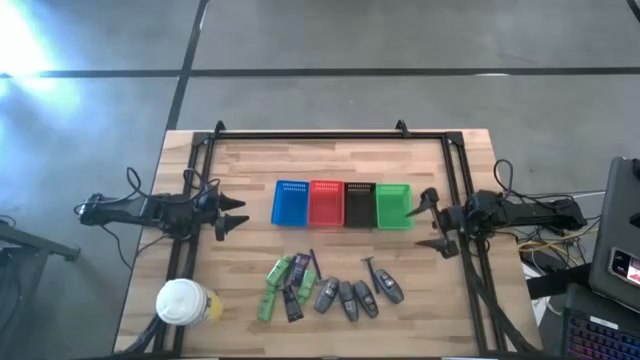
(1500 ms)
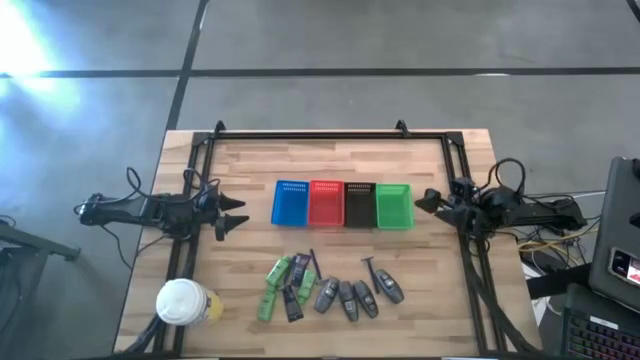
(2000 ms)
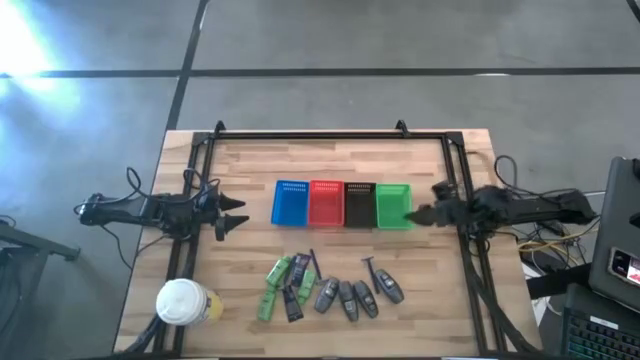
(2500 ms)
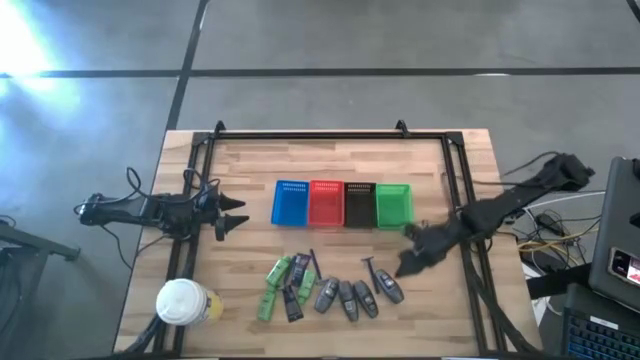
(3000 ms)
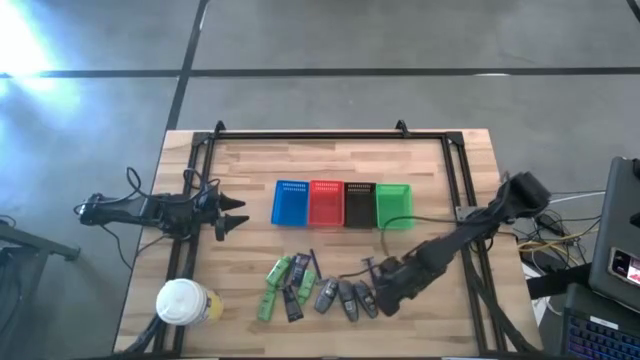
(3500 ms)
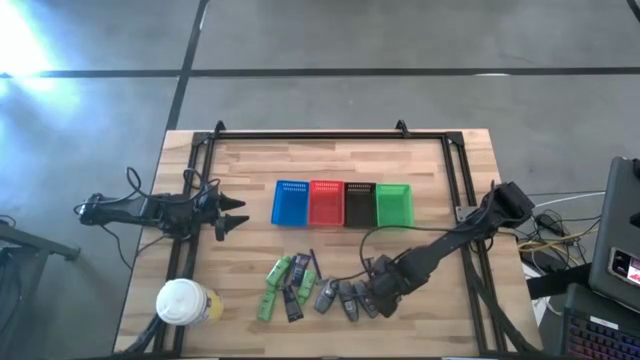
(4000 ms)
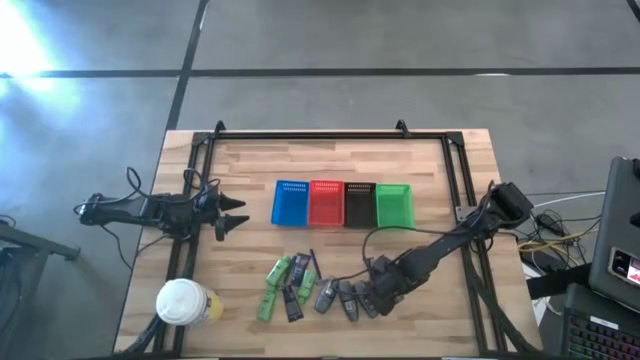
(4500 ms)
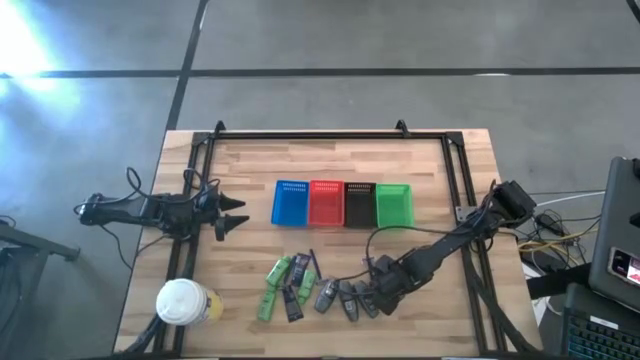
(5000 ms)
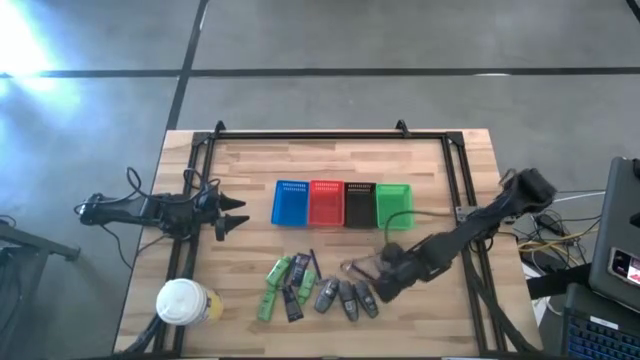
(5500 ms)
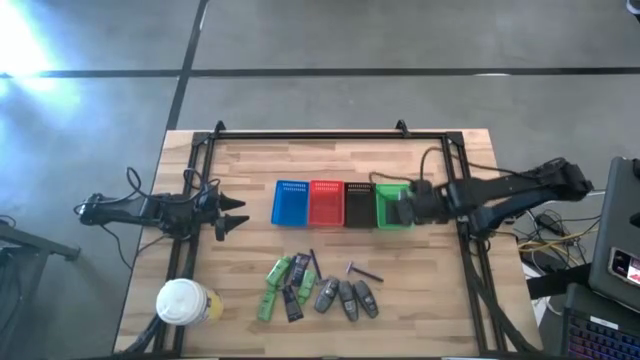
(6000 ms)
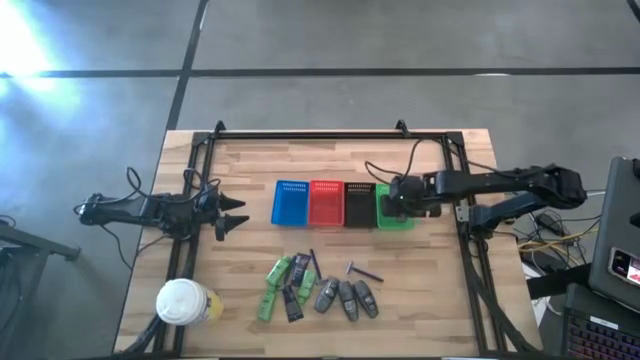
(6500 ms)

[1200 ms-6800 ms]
Task: Pick & Place Travel size toiletries
Put the gray deodorant into the green bin

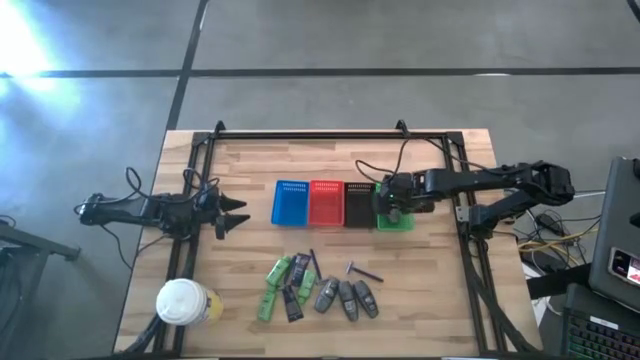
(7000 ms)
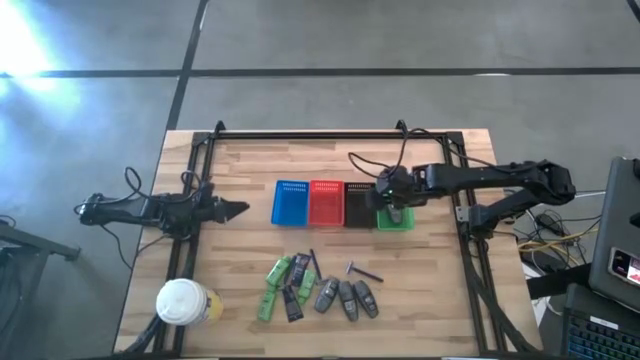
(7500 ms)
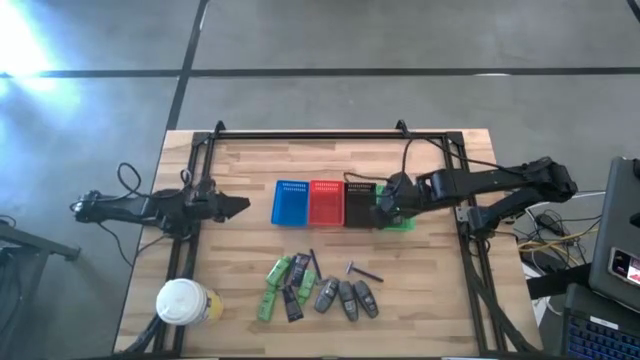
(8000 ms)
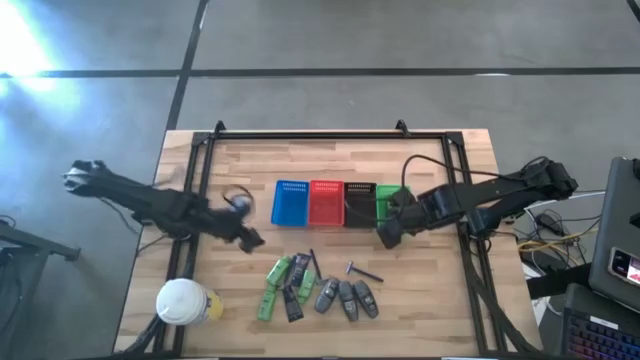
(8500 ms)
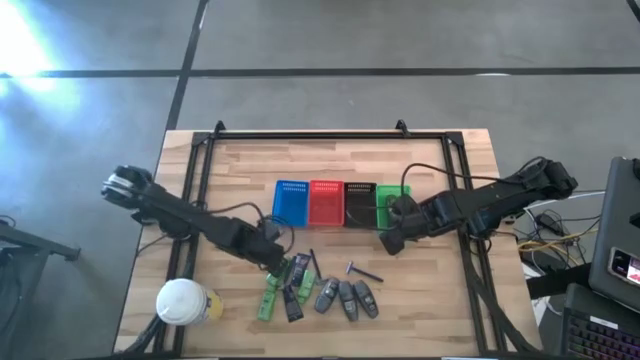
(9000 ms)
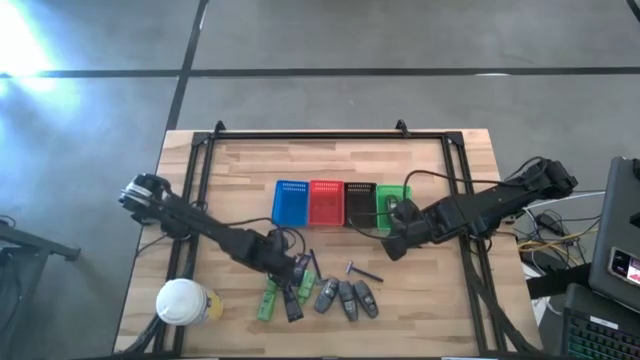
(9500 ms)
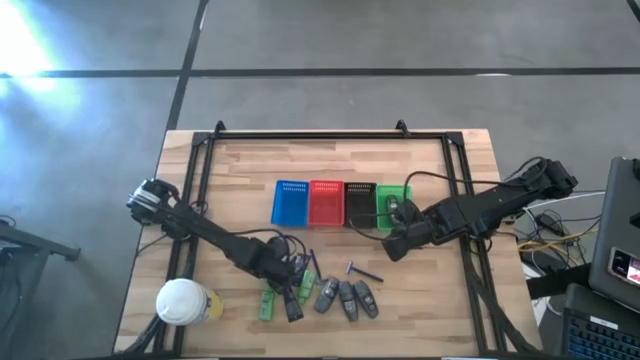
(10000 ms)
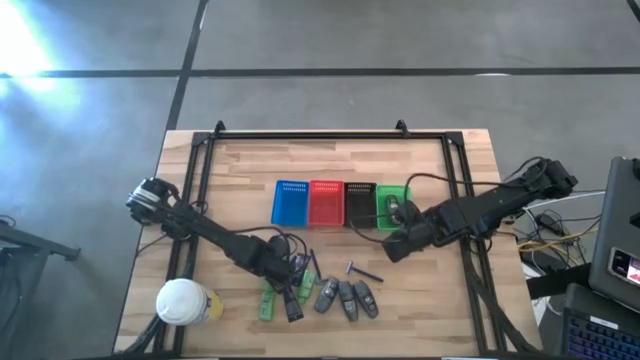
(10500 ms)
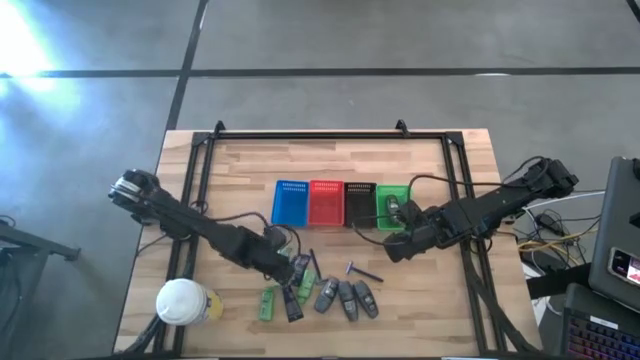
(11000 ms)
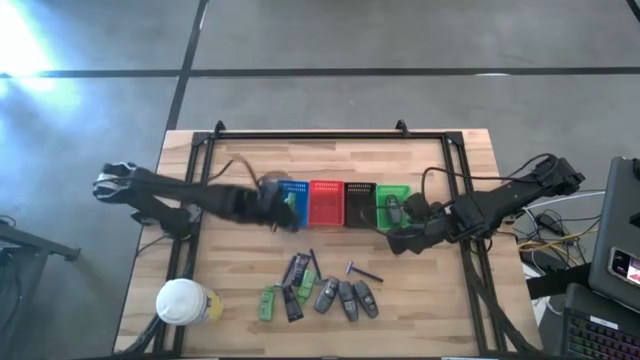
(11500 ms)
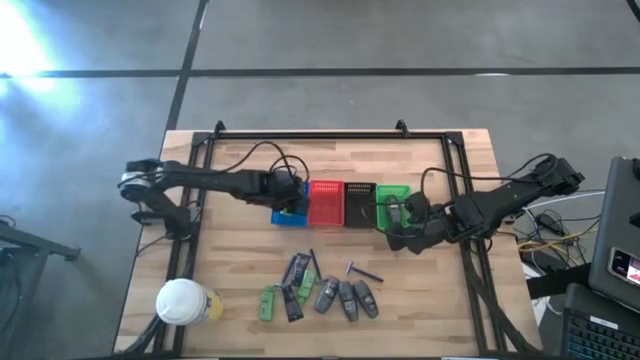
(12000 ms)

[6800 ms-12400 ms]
Put the green shampoo into the blue bin

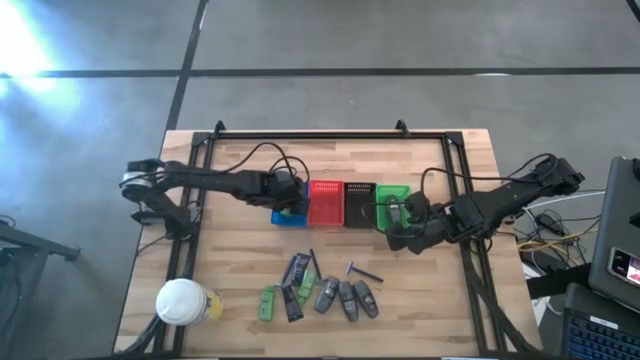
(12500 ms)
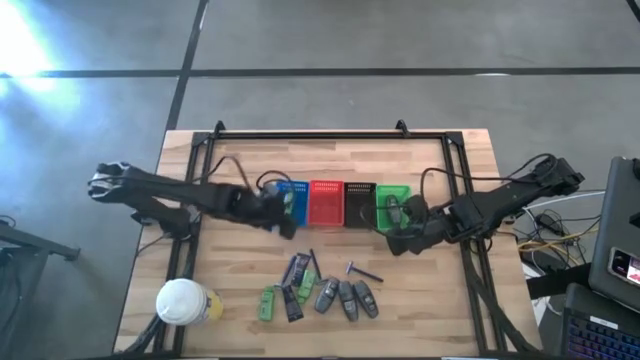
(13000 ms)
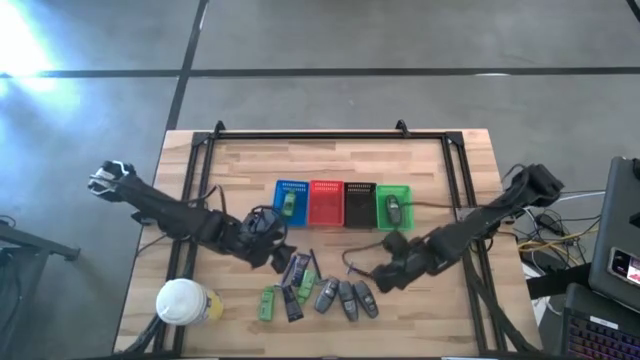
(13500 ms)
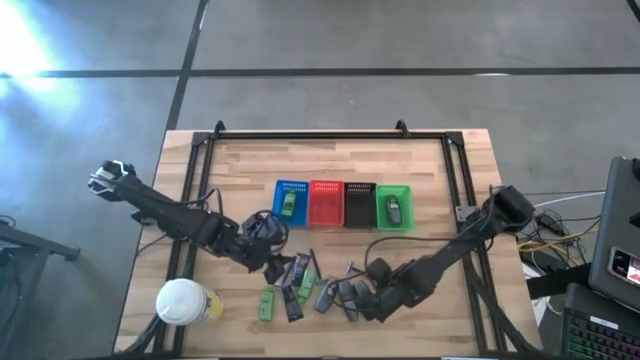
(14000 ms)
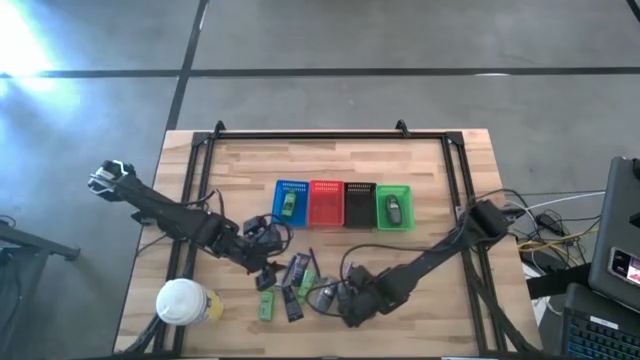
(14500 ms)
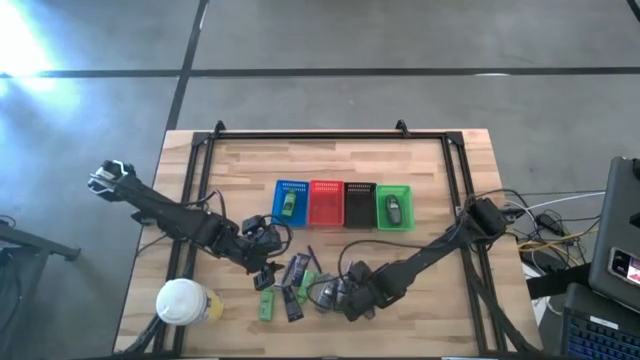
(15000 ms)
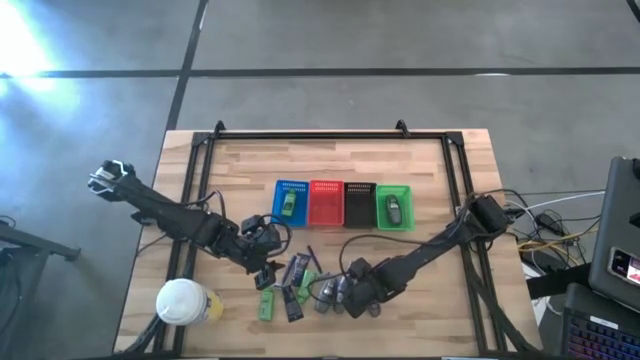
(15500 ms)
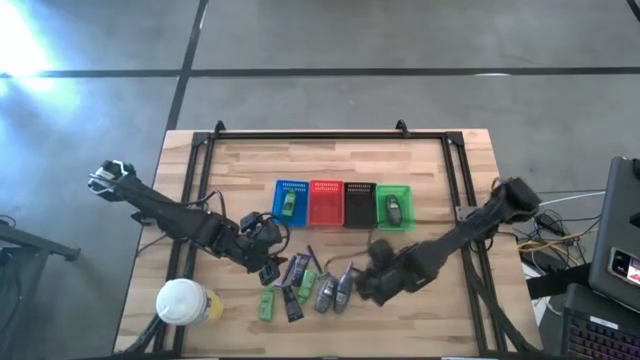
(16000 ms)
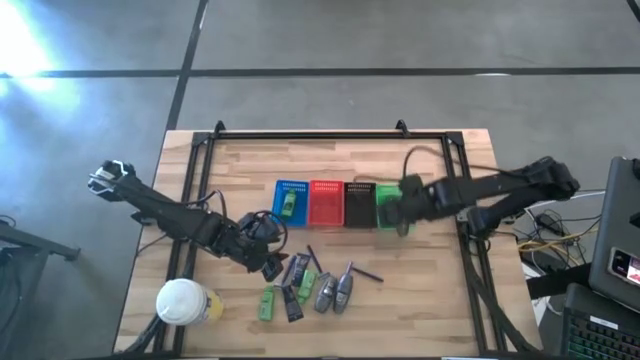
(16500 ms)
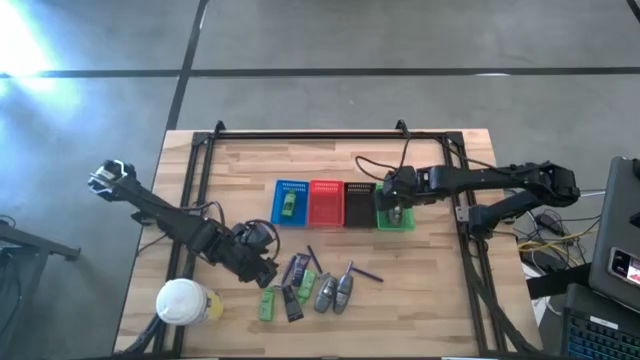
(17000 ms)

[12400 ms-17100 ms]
Put the gray deodorant into the green bin

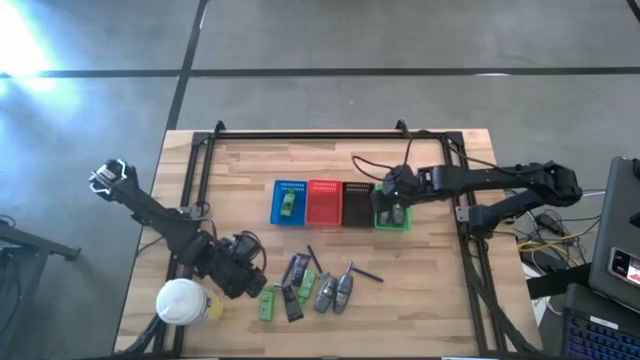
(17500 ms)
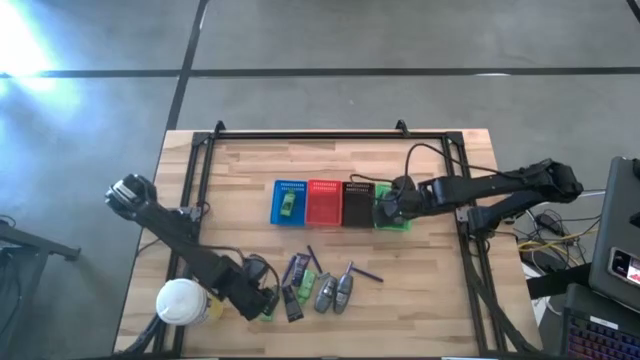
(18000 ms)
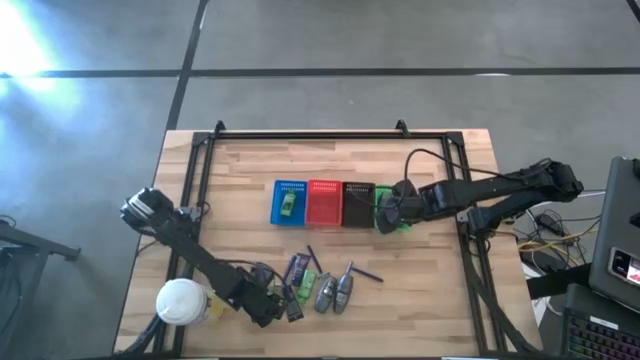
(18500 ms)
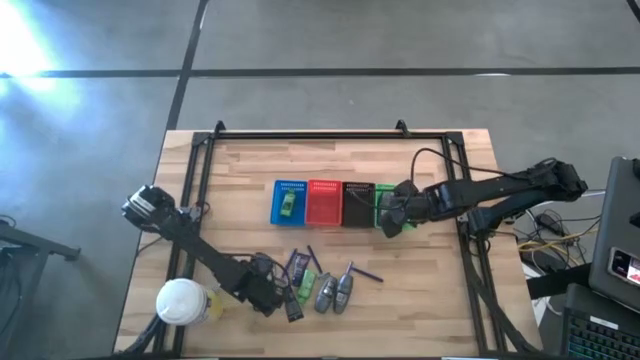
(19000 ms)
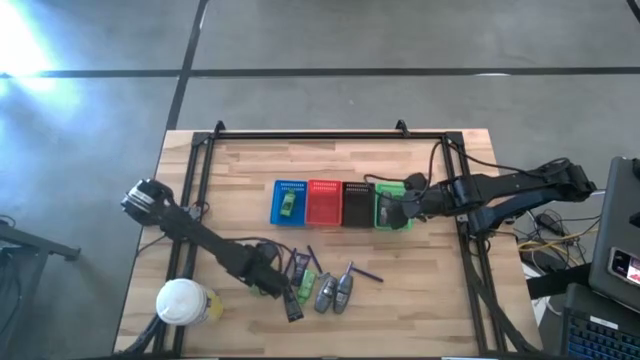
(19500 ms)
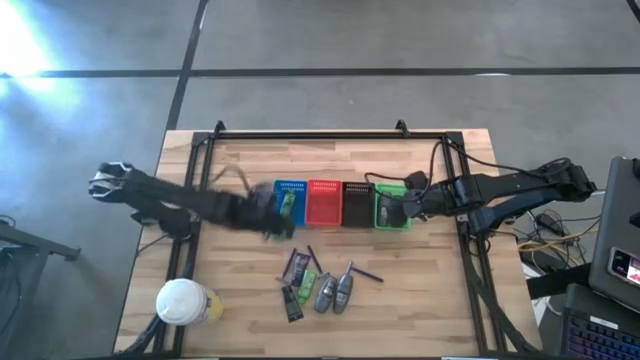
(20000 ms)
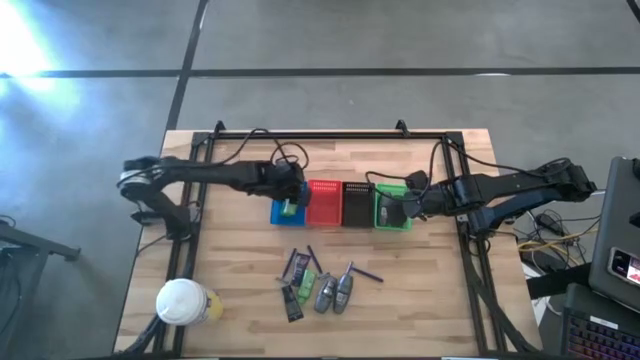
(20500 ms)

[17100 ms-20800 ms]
Put the green shampoo into the blue bin

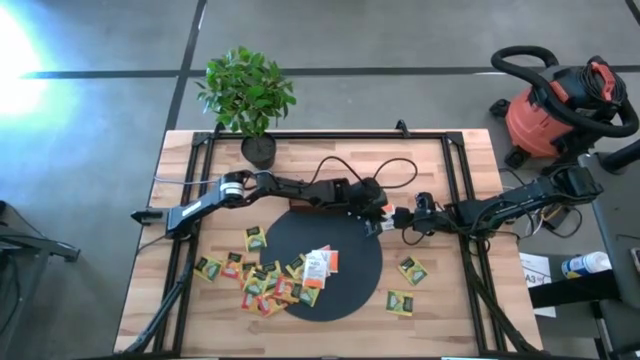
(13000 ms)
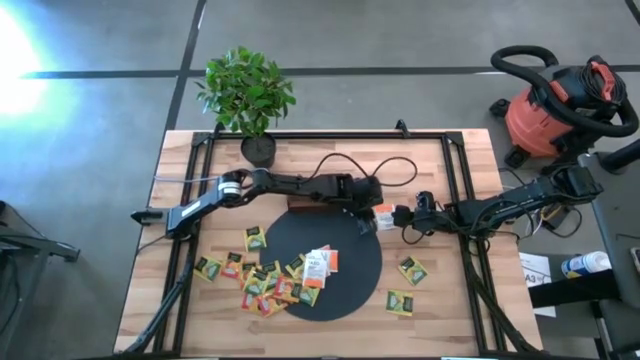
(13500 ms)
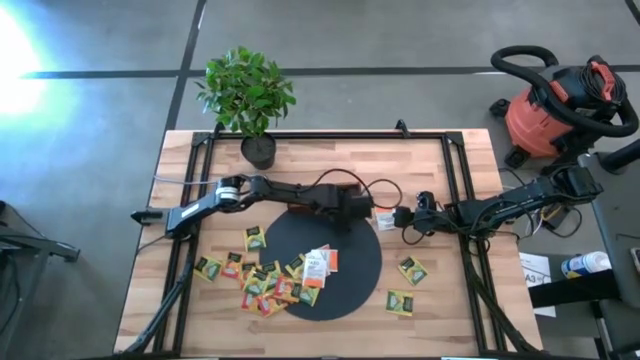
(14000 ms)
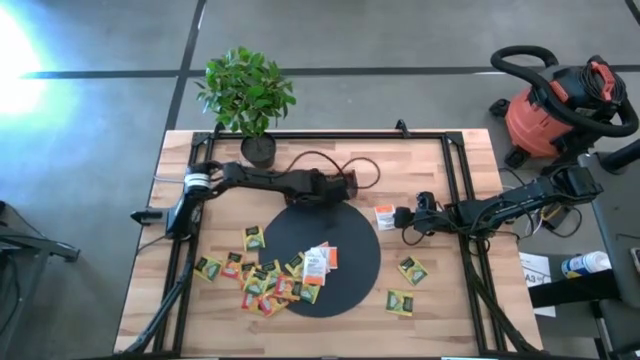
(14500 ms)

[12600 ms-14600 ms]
Task: Pick & Place Tea
Adjust the wooden organizer on the table
